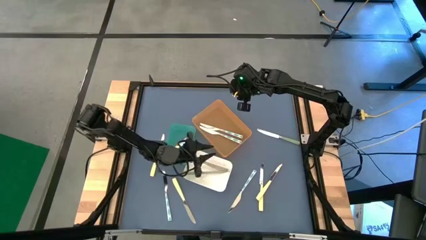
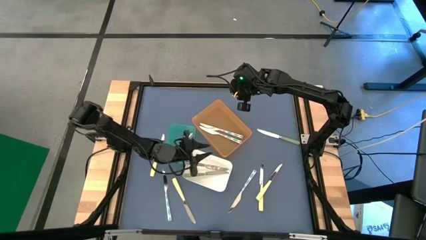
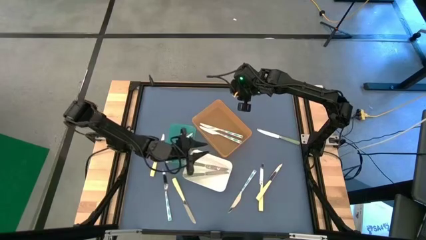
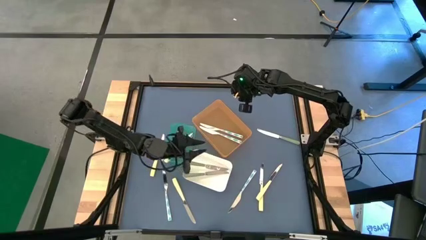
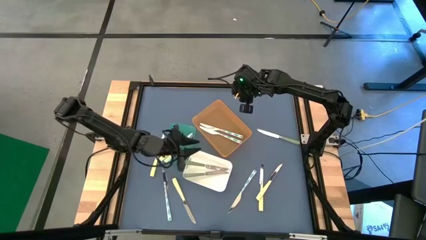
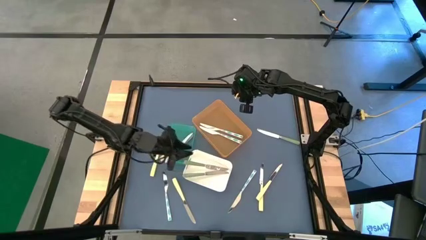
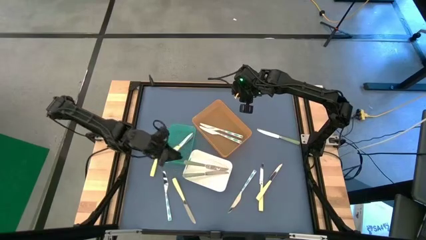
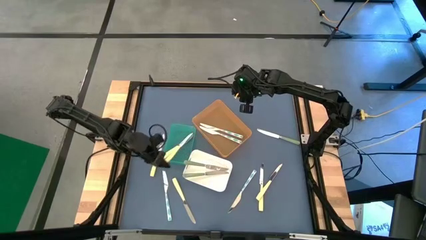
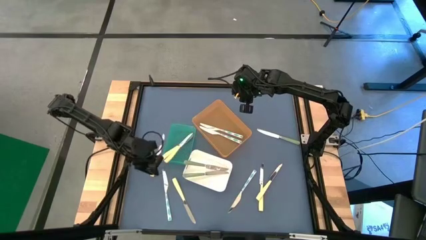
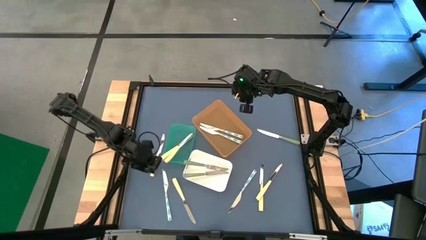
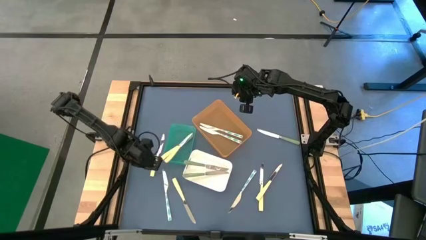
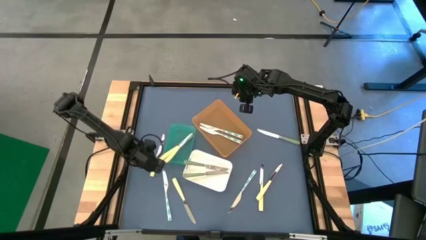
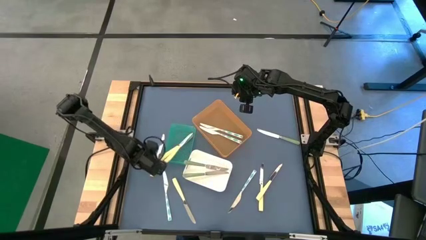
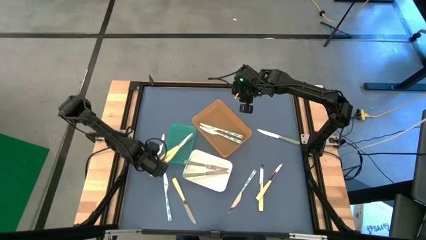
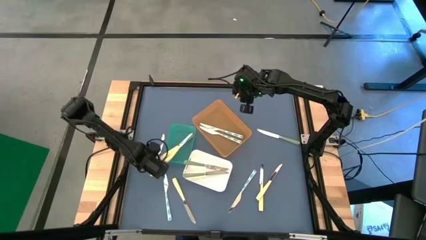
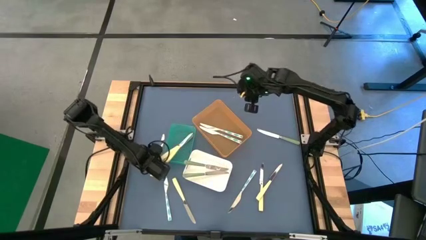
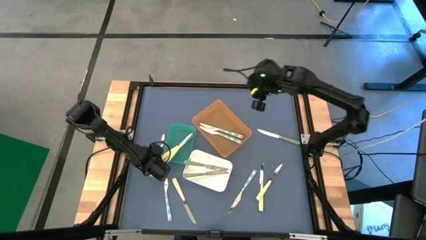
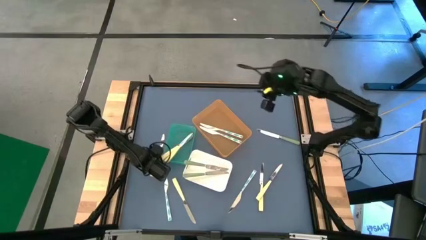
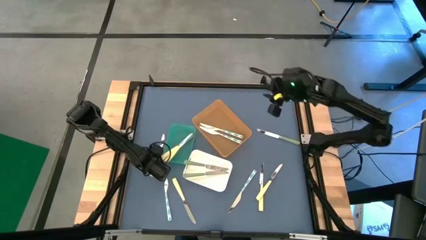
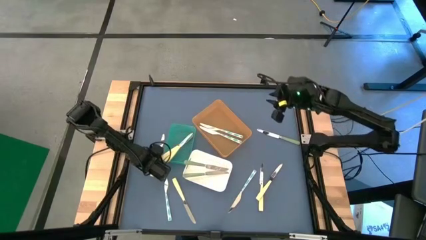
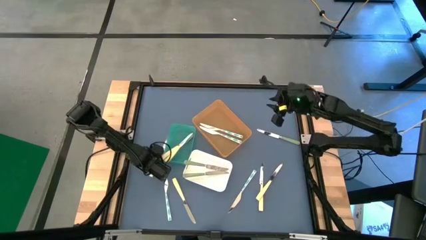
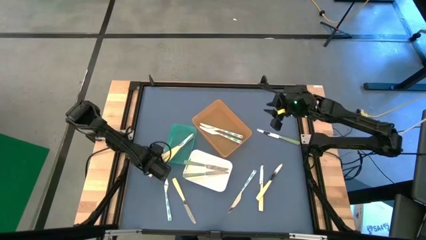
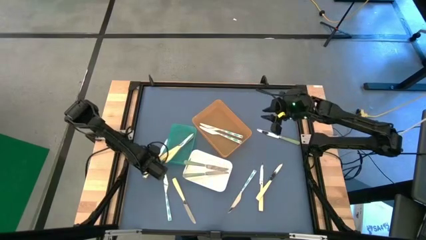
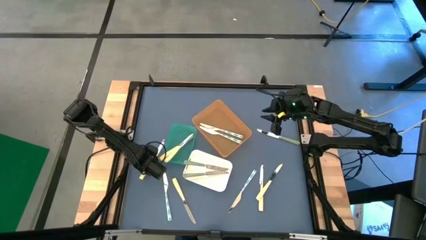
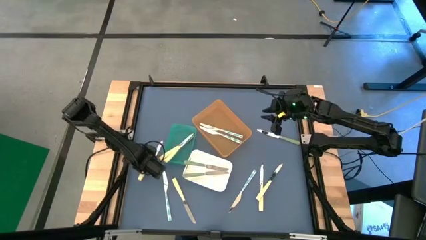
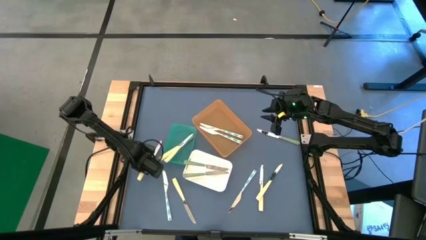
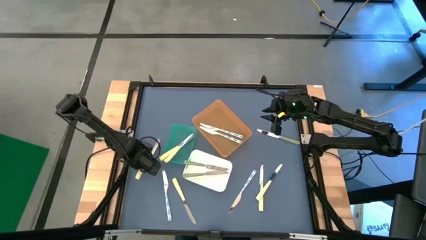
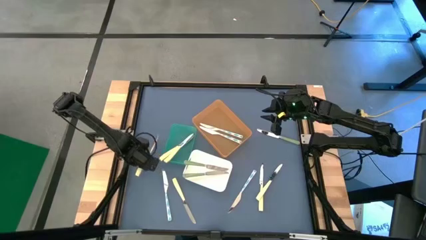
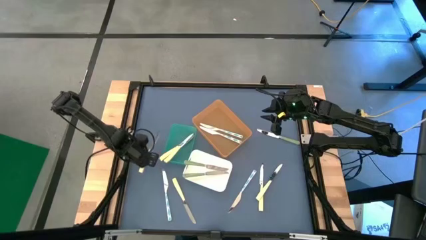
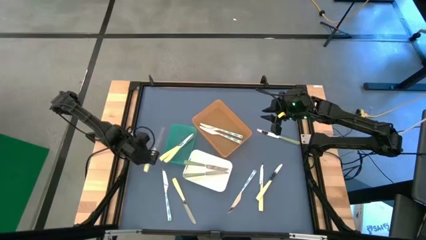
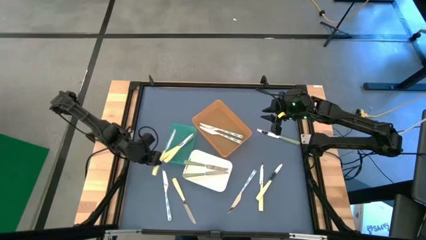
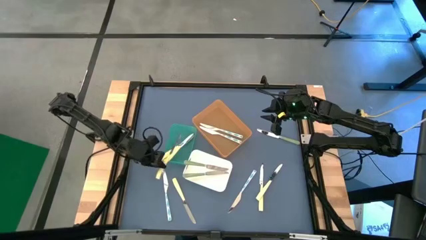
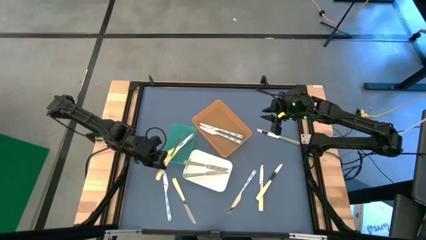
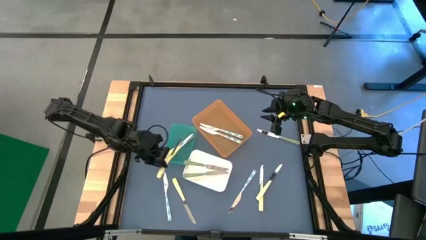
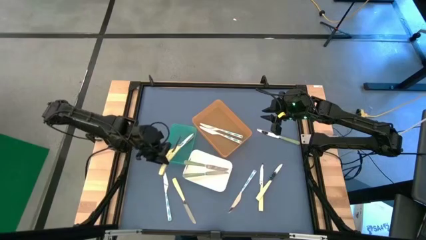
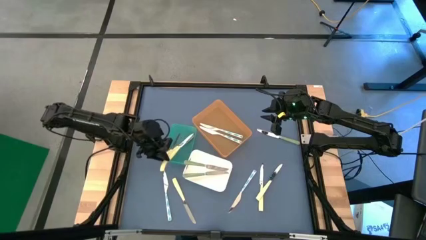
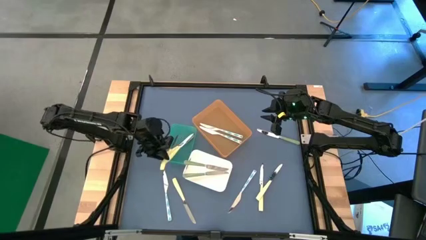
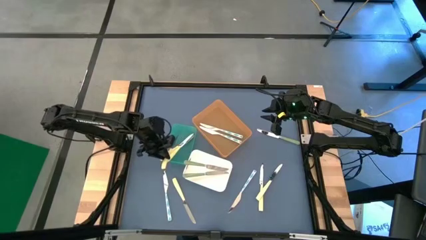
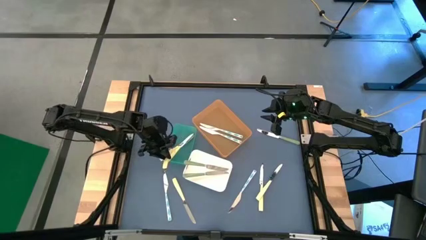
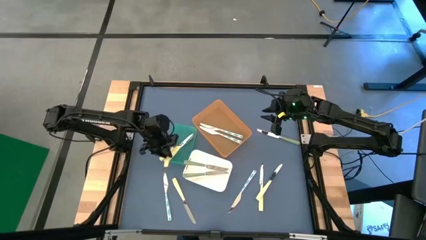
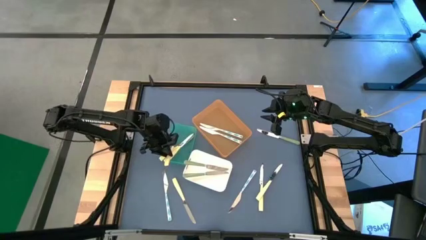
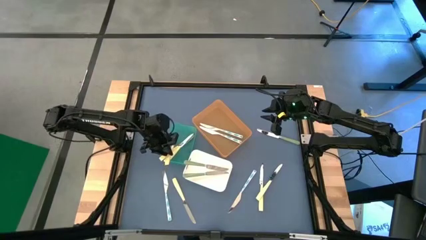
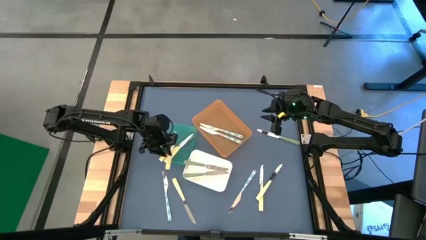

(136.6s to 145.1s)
Task: Sort silverware by color (type)
Put the yellow table knife into the green bin

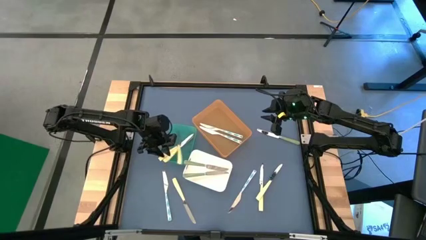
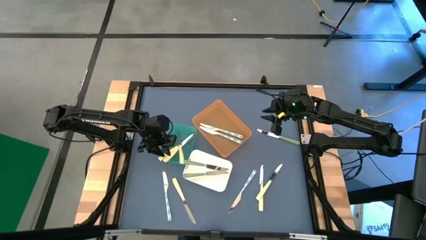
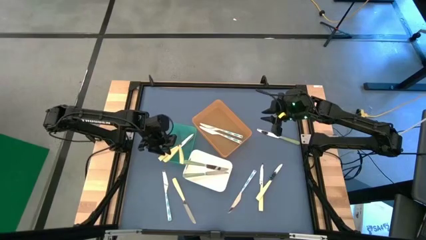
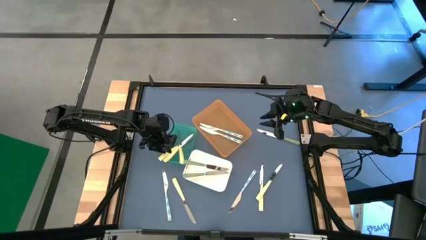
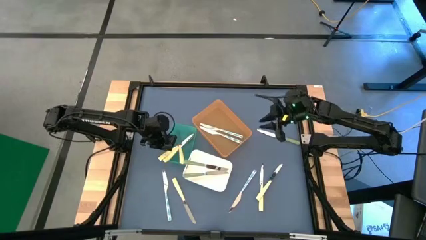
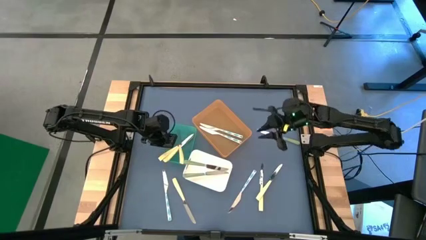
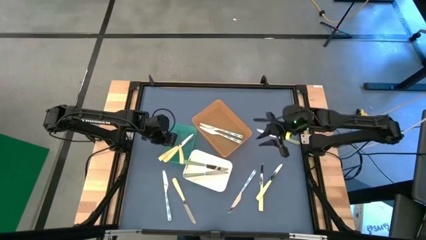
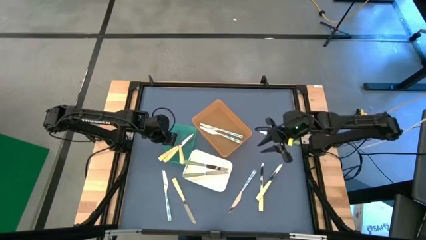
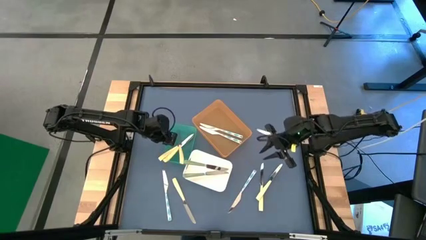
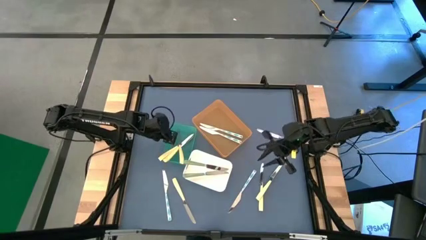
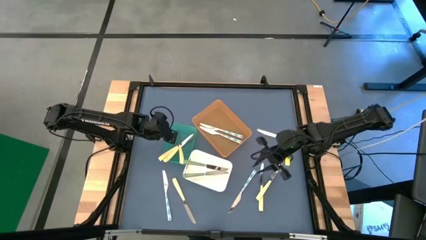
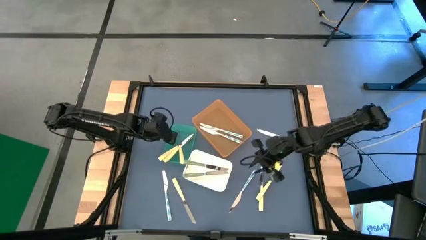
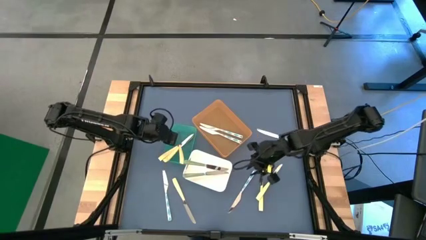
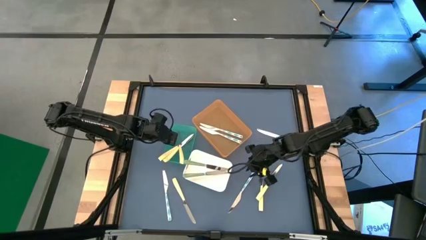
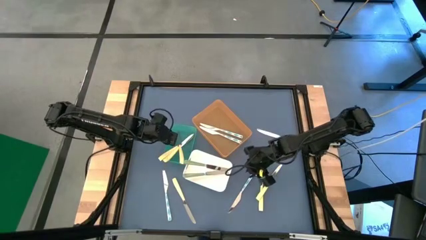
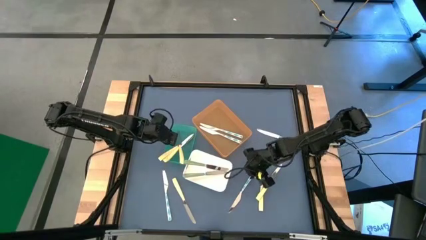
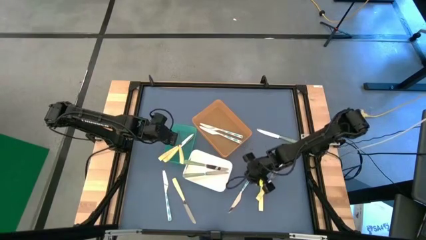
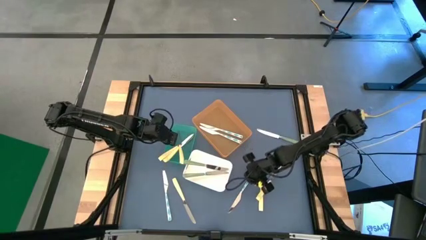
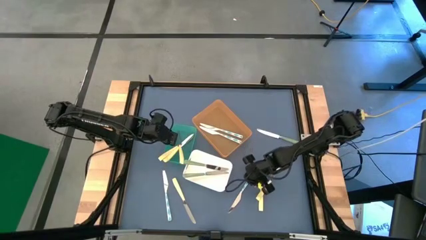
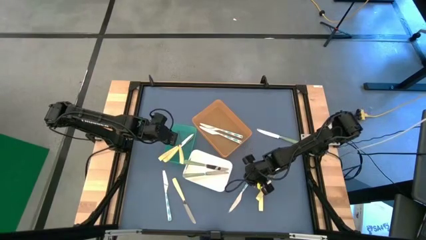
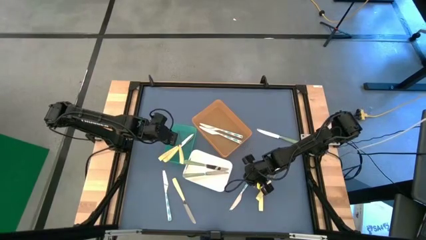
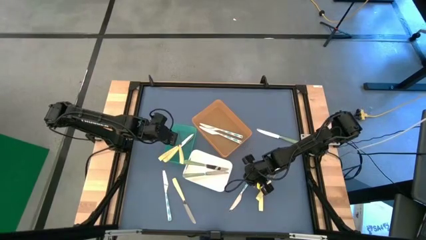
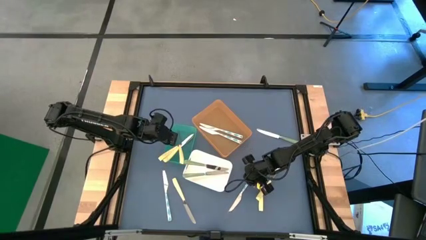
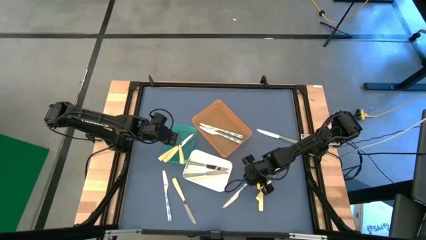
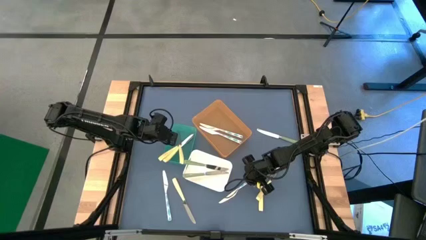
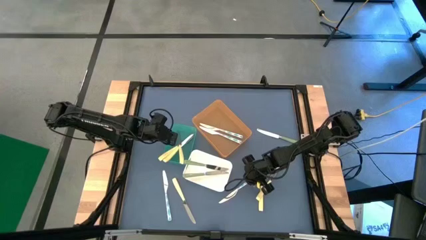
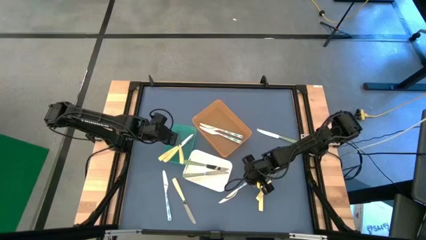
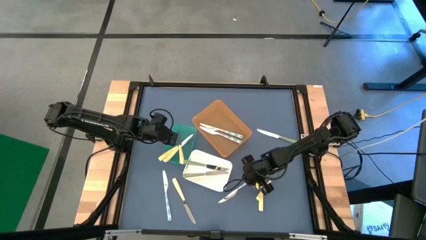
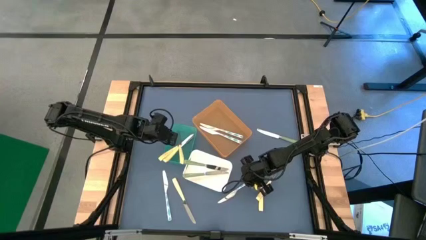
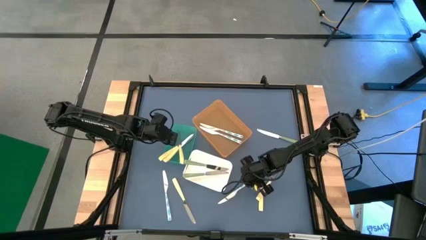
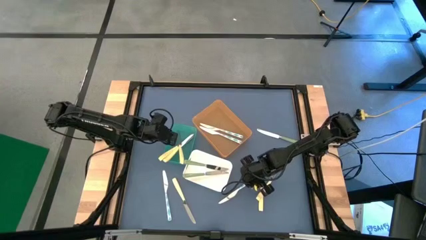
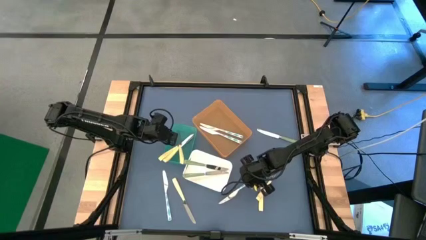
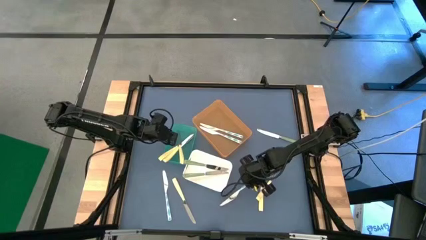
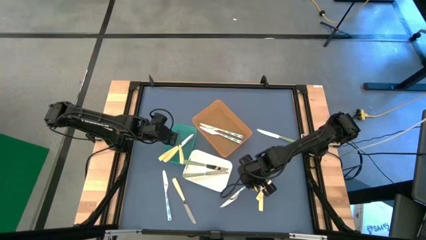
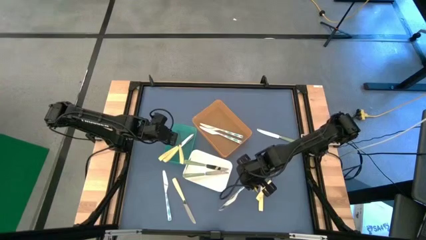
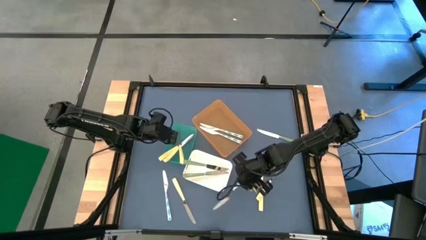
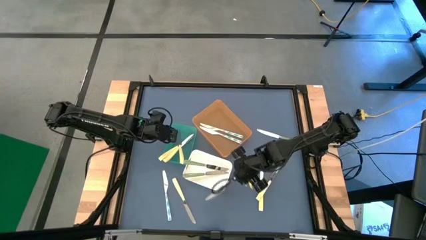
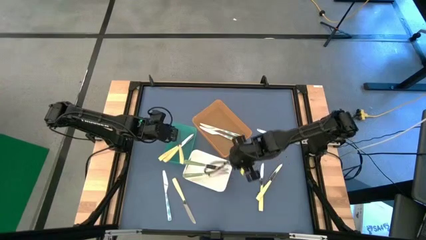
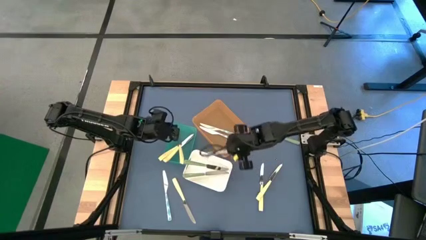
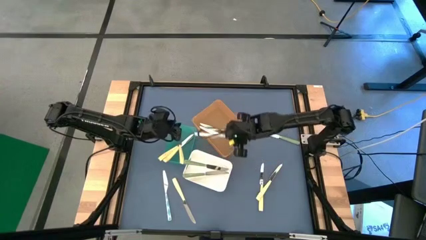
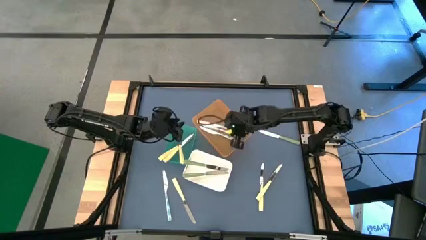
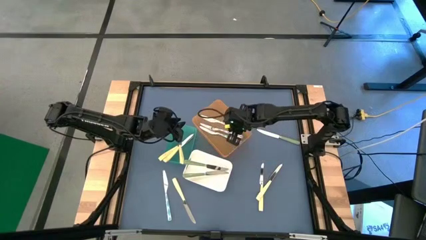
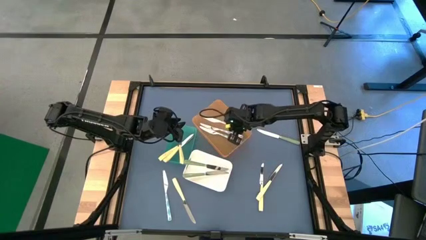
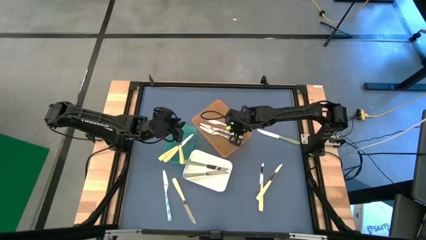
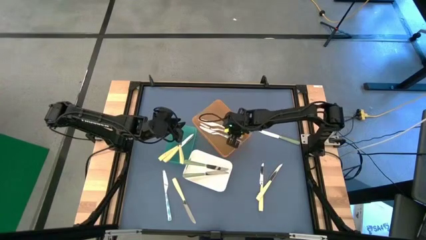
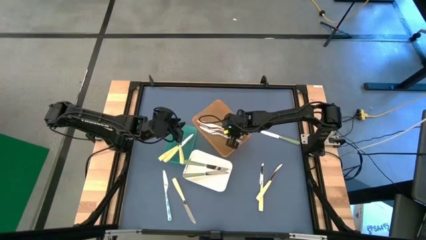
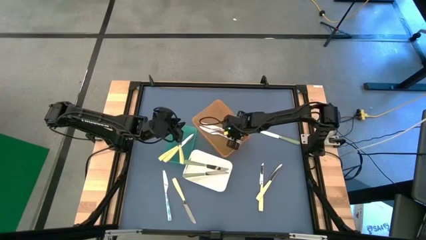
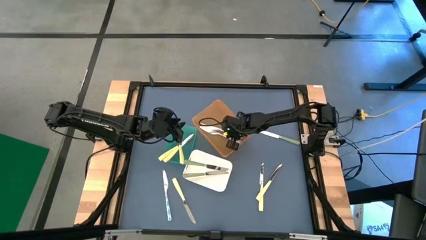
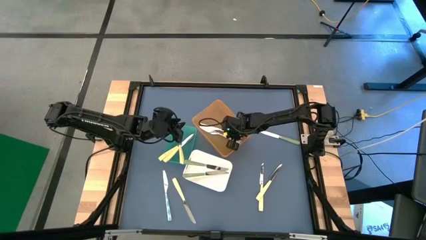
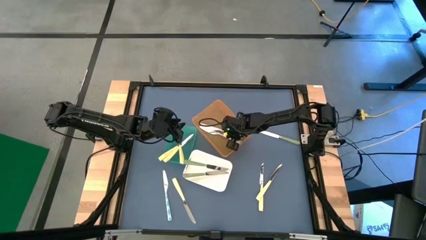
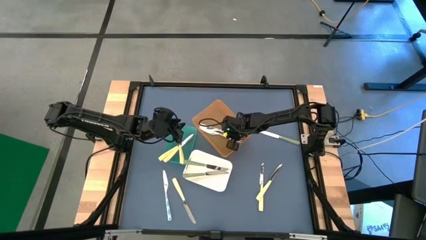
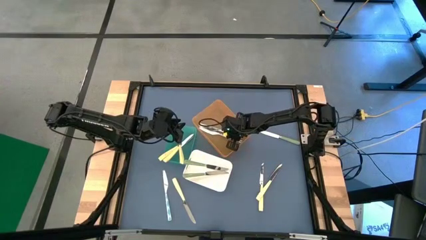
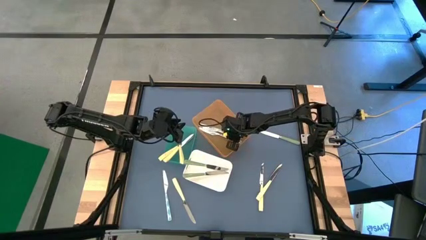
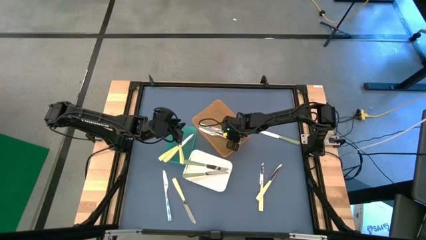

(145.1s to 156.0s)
Put the blue table knife into the orange bin
